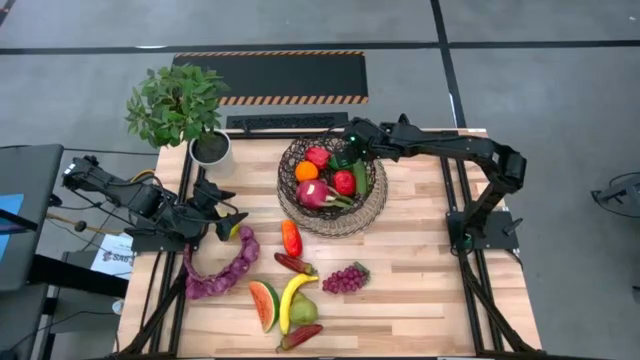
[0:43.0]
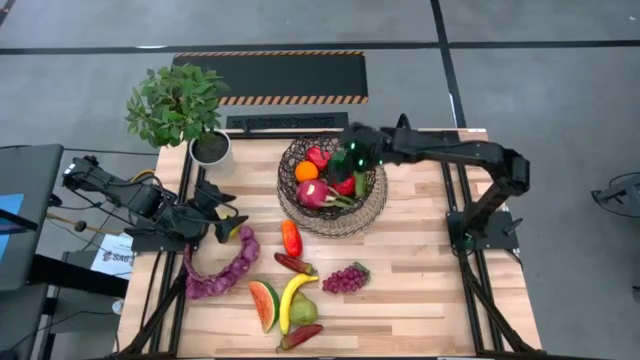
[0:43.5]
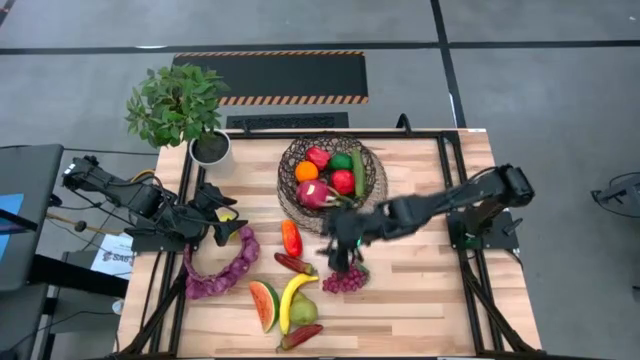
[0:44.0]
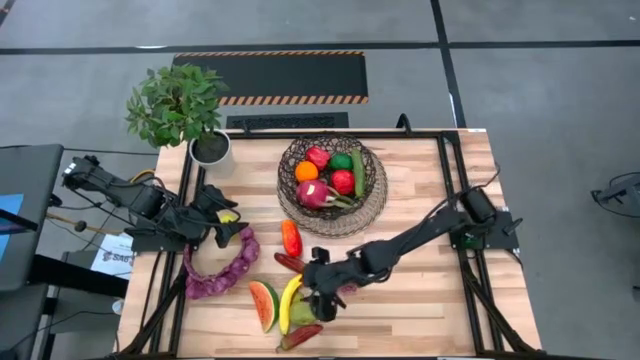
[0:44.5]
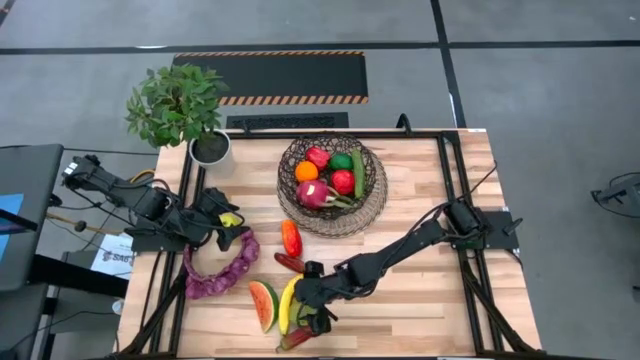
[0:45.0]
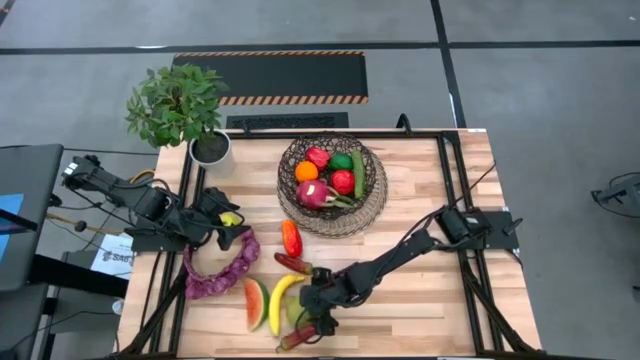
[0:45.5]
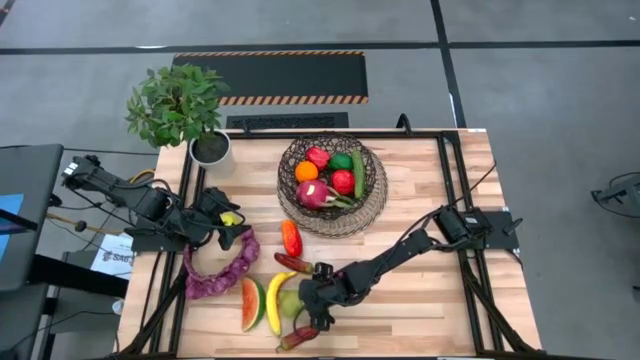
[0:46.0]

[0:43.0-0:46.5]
Task: Build produce basket
Put the pear into the basket

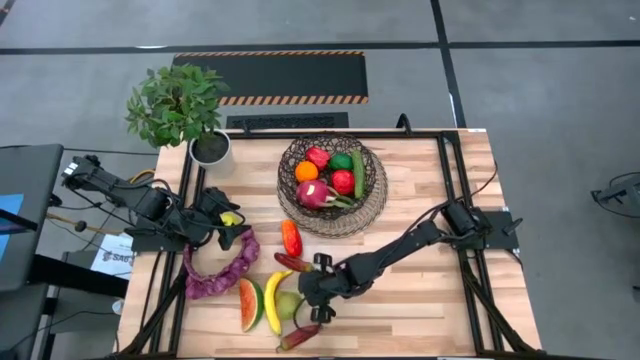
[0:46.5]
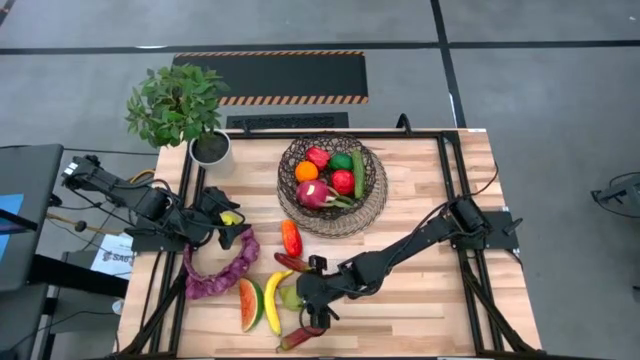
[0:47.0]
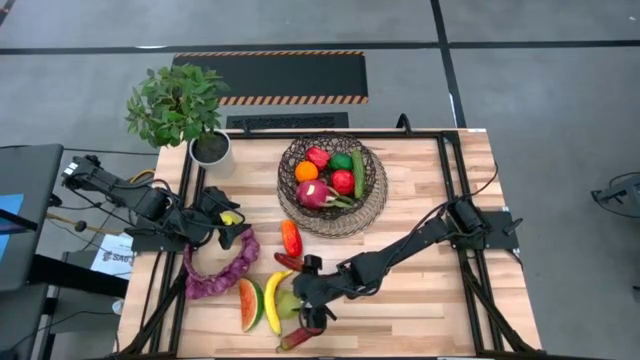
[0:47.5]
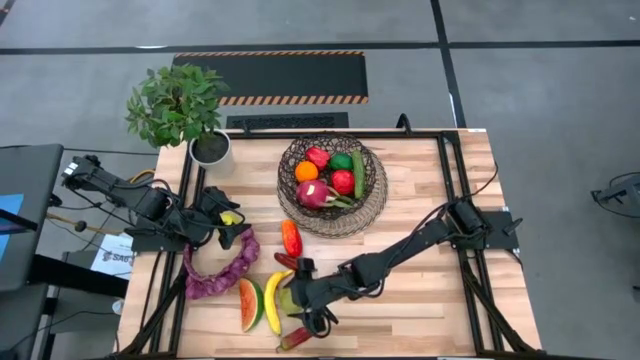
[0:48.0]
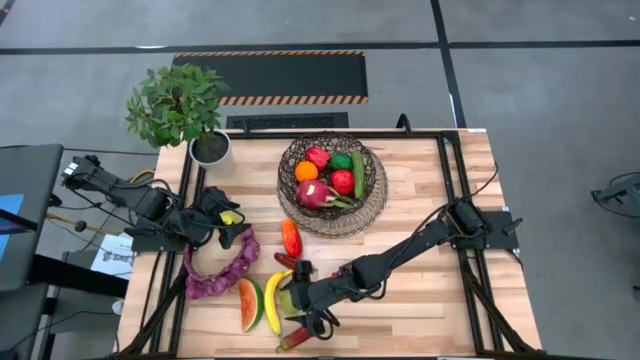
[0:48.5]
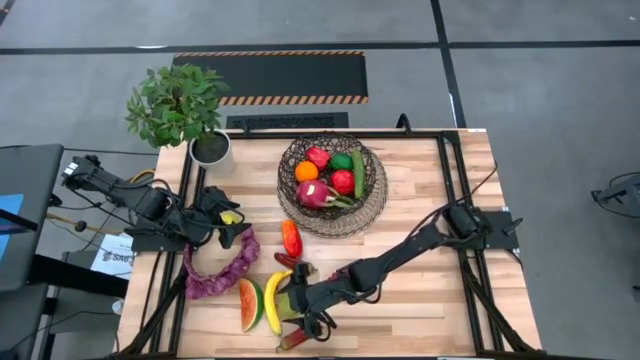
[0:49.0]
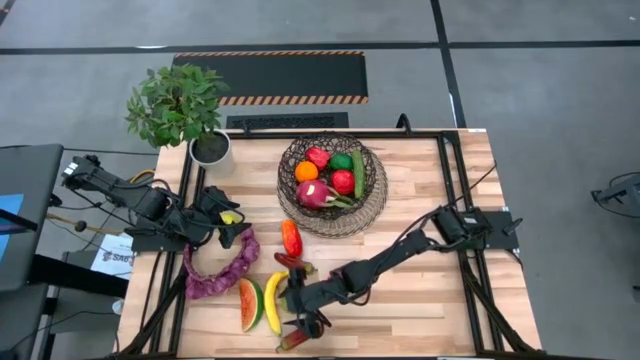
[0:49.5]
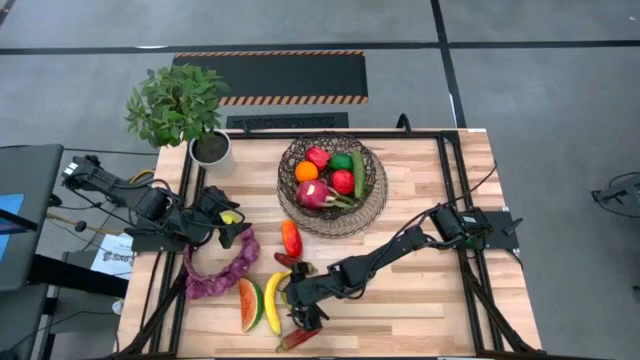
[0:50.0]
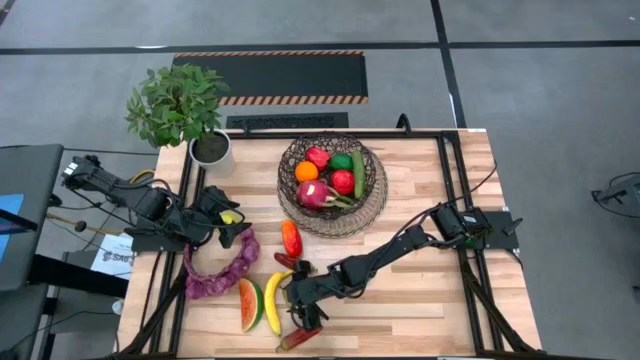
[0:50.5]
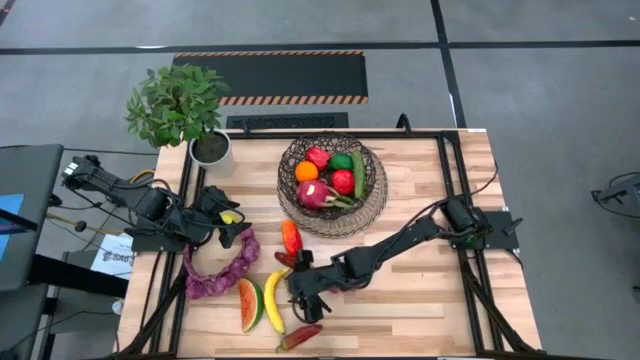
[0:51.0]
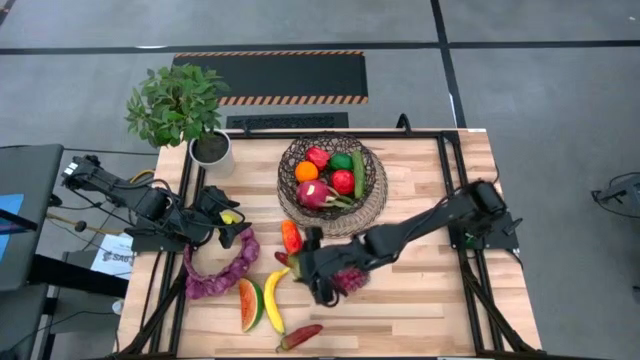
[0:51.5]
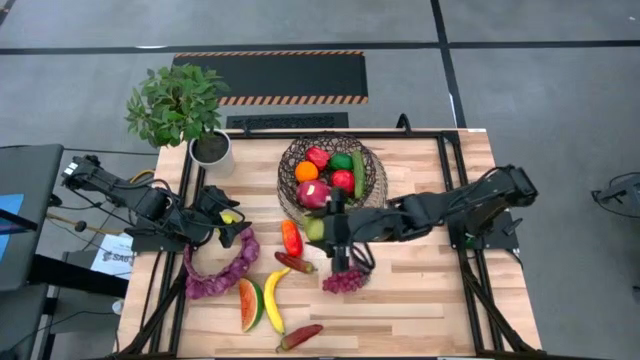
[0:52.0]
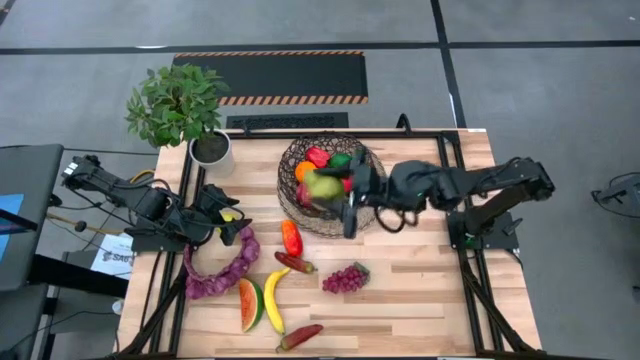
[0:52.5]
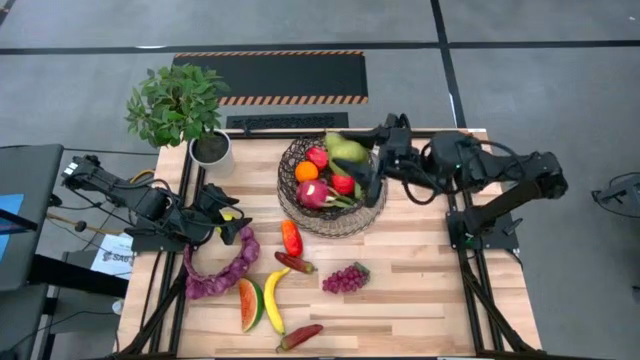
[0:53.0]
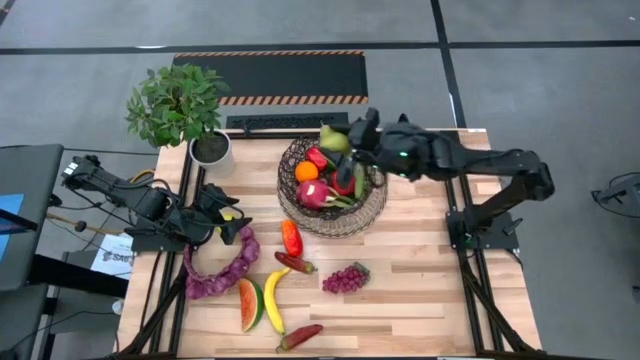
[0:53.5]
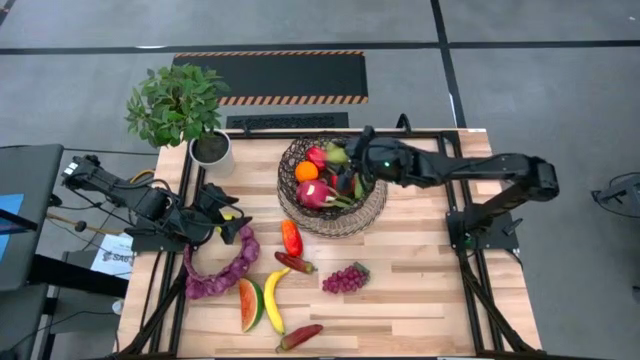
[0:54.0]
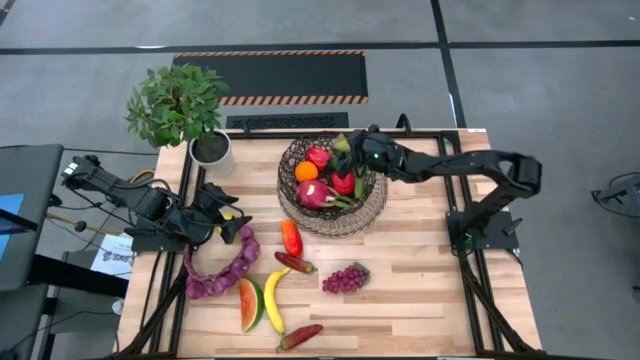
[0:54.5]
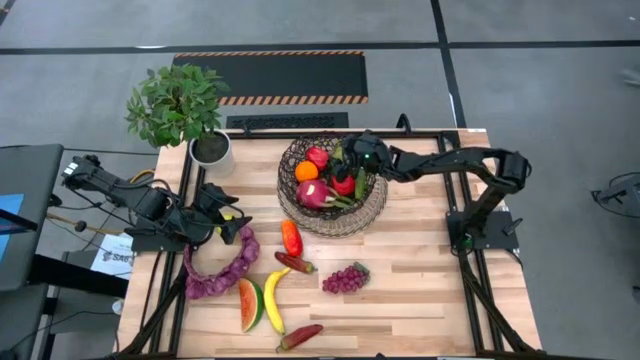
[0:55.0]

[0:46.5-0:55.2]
Put the pear into the basket

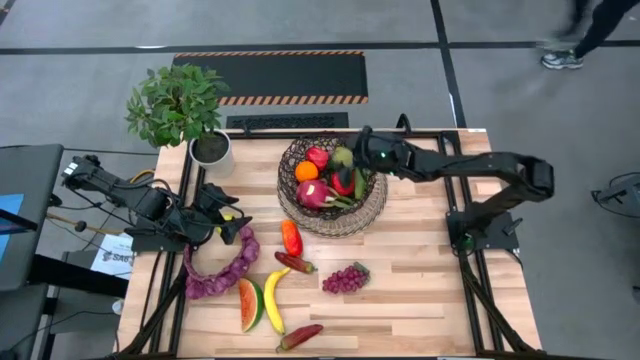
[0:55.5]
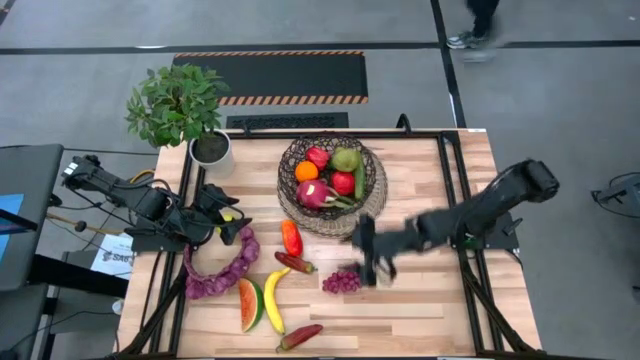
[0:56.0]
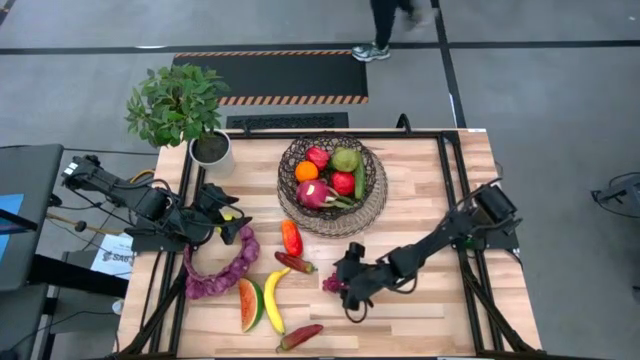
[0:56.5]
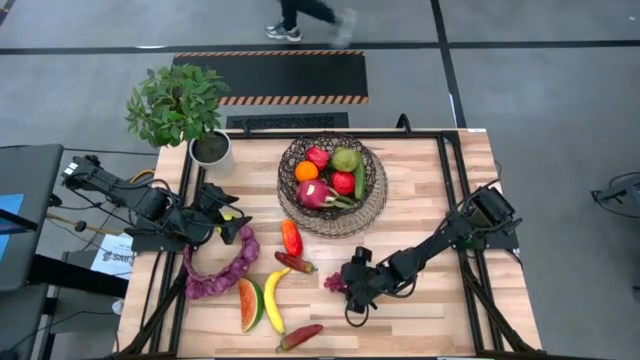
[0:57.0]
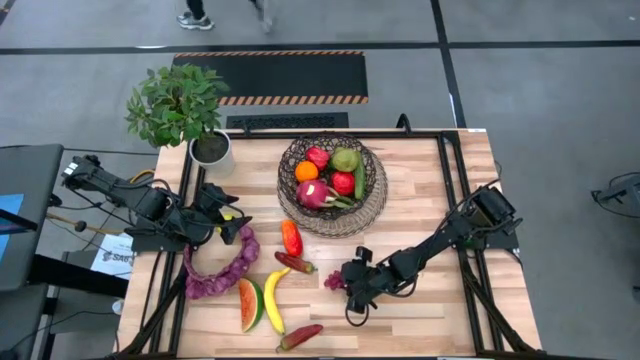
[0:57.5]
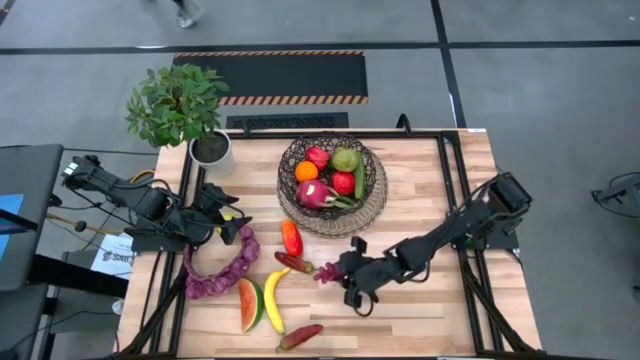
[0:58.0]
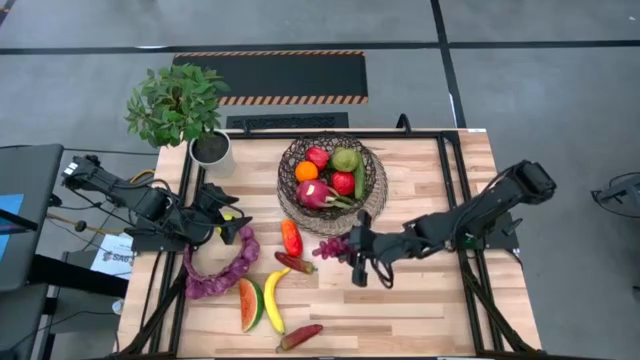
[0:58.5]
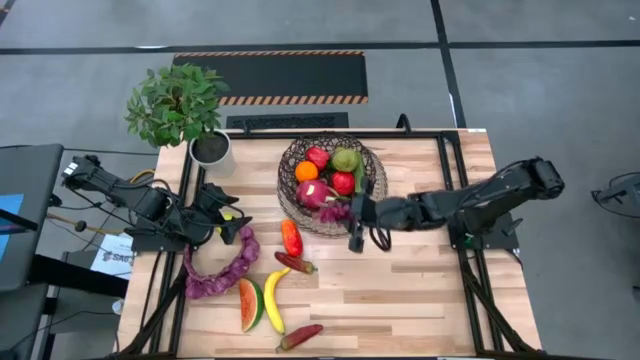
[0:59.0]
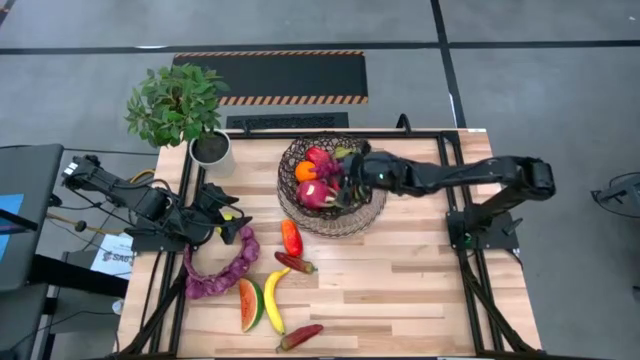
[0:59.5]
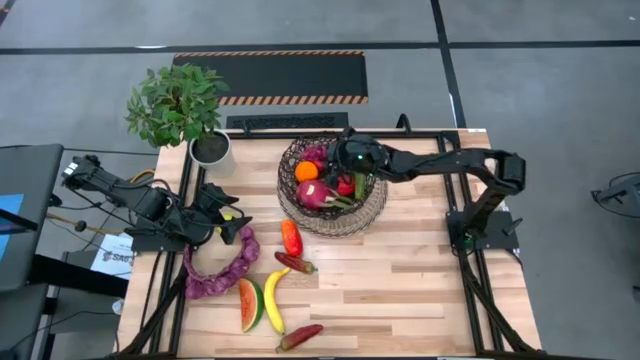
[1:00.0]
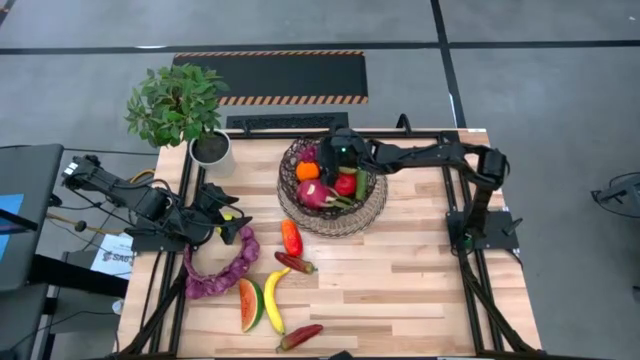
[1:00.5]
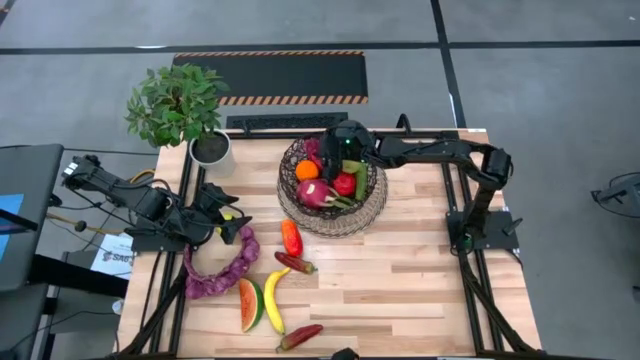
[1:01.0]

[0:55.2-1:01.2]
Put the grapes into the basket

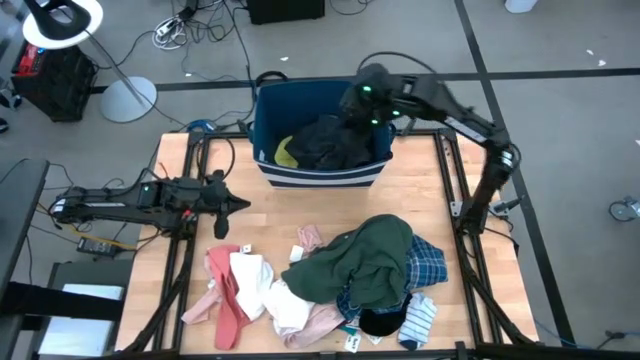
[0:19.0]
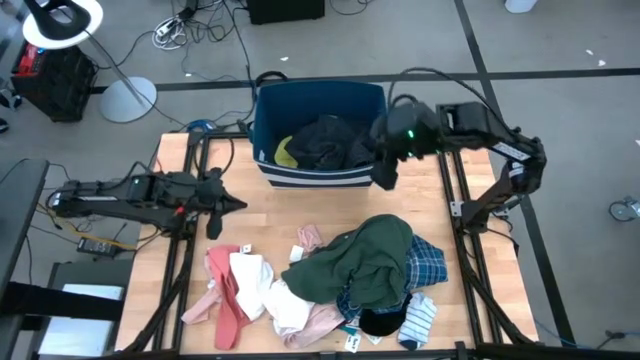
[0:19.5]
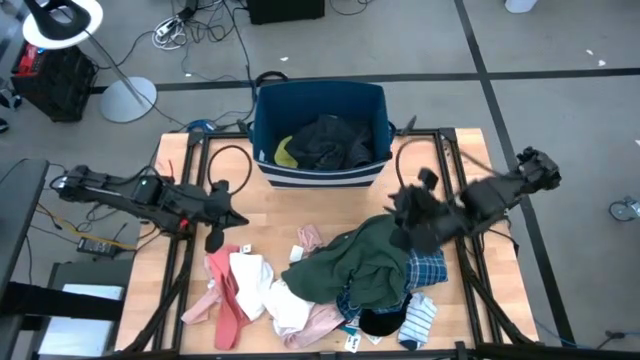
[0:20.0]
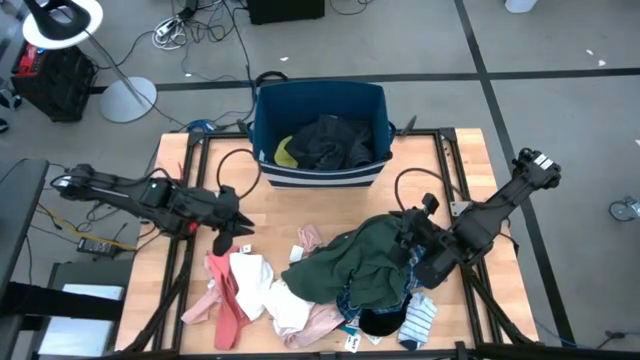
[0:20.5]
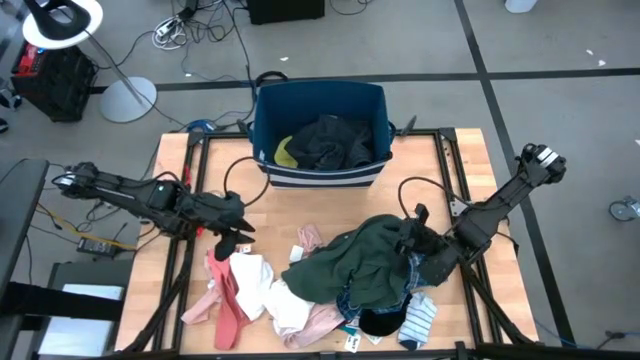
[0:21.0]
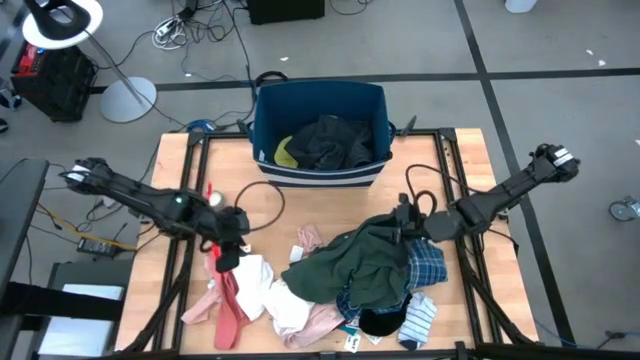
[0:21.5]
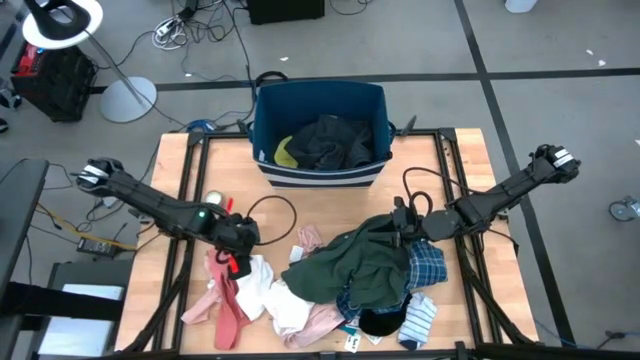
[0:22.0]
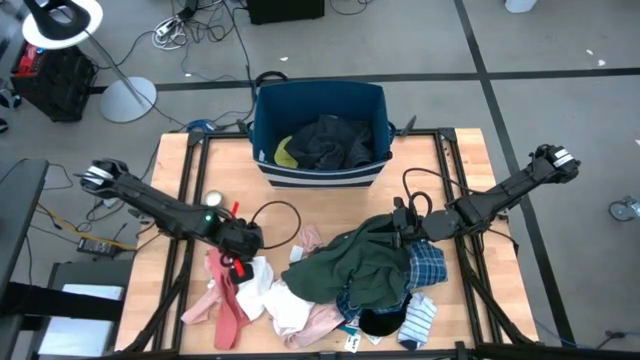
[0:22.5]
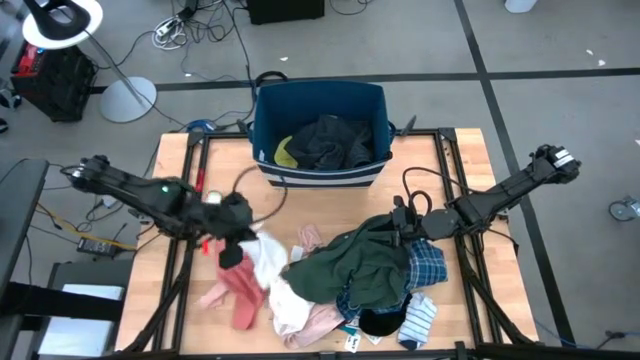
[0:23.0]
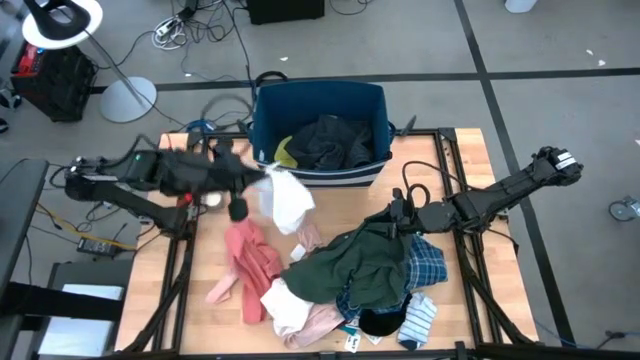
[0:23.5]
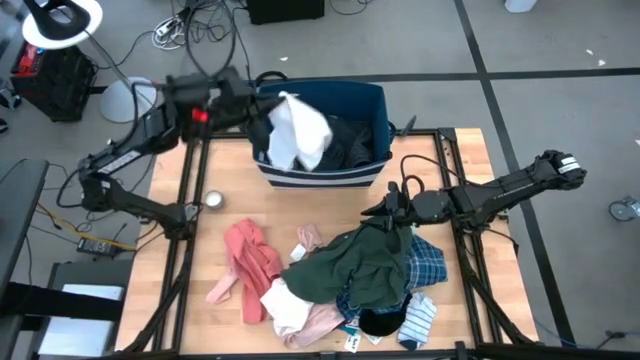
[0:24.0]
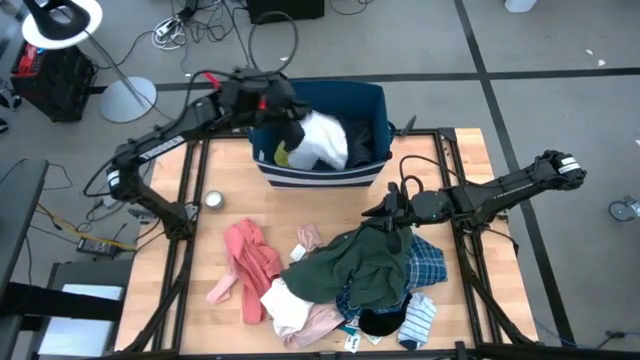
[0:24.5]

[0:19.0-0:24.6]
Task: Sort clothes
Put the left white boxer into the blue laundry organizer
